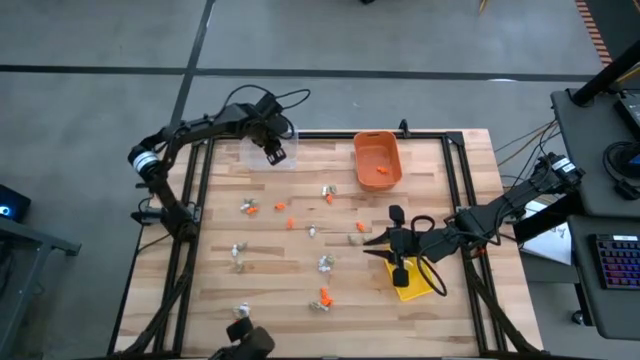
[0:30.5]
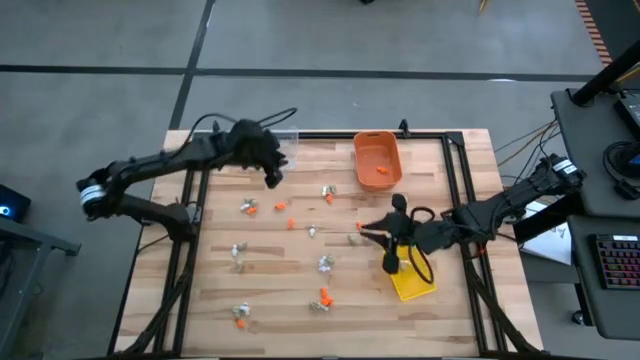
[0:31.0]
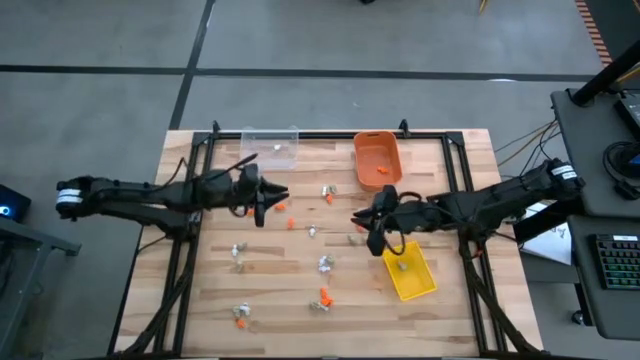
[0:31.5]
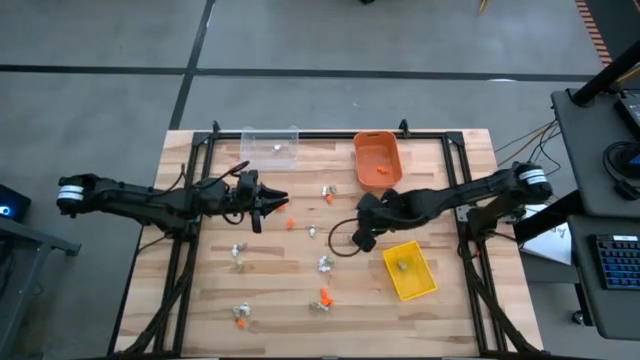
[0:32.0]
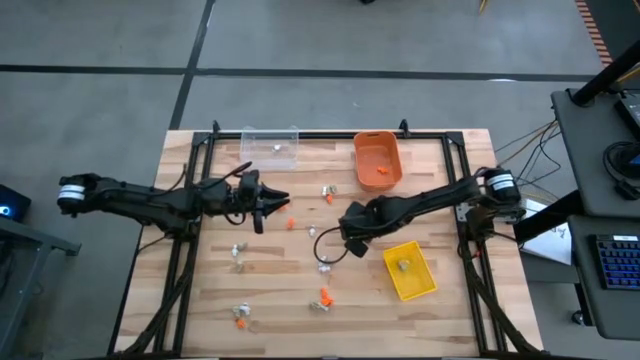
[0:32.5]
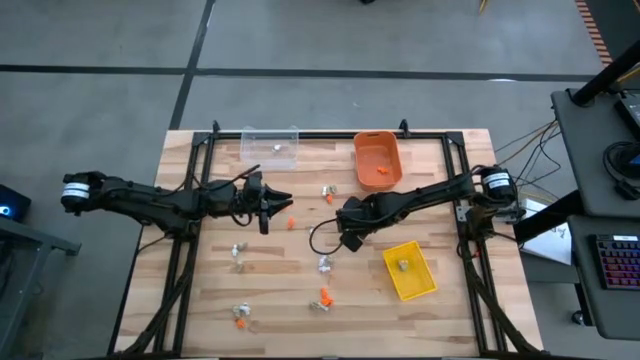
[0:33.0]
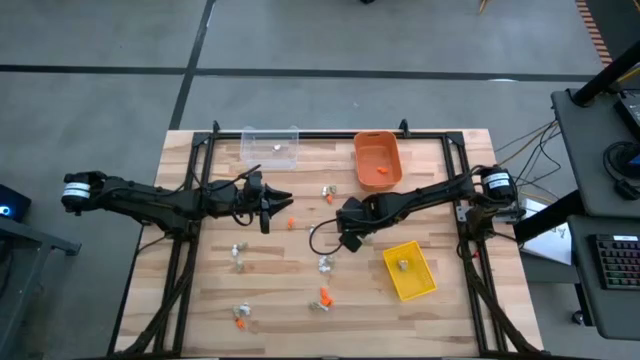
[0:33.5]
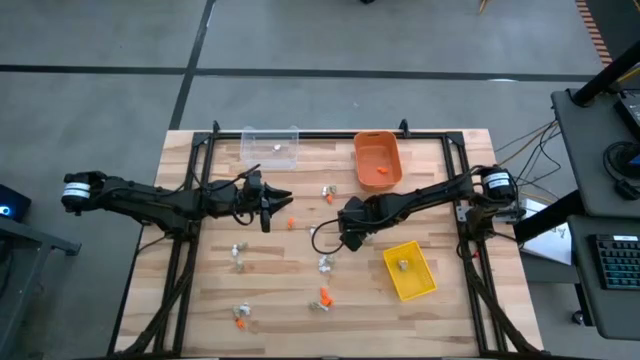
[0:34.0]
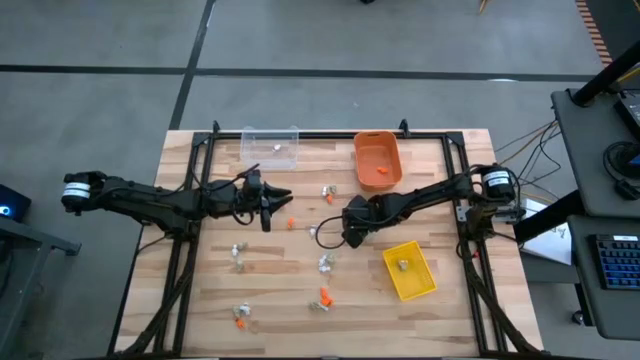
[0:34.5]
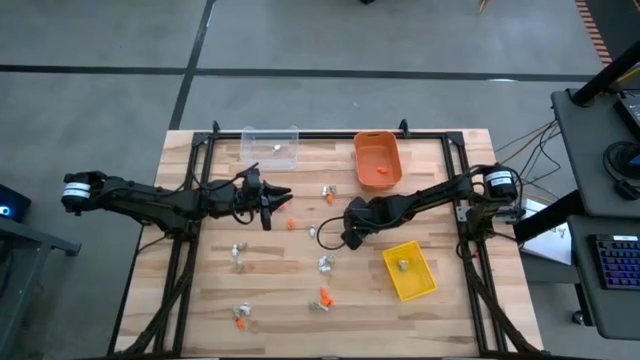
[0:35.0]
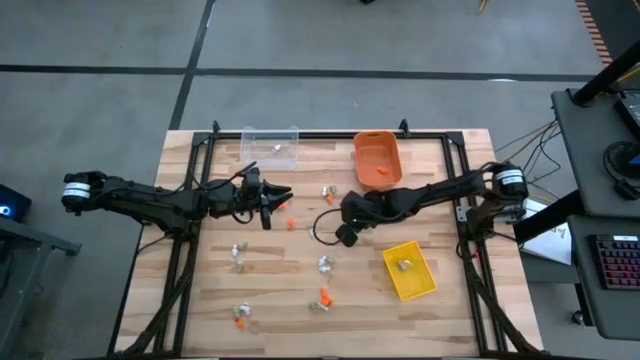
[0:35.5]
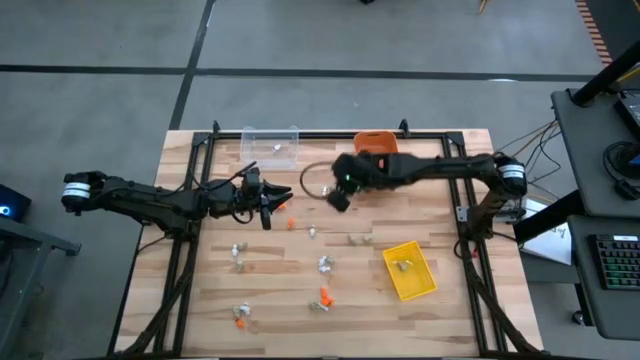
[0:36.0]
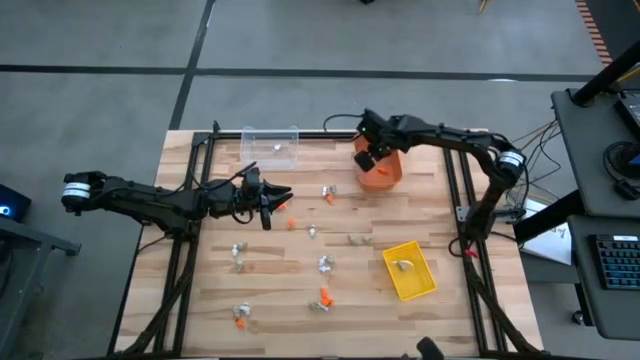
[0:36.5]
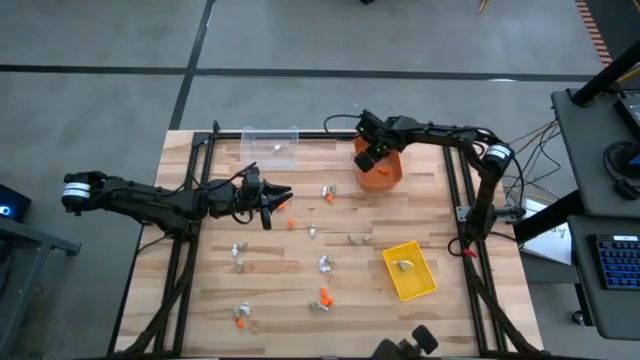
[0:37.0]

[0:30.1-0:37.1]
Task: Sort Halloween decoration
Put the orange skeleton toy into the orange bin

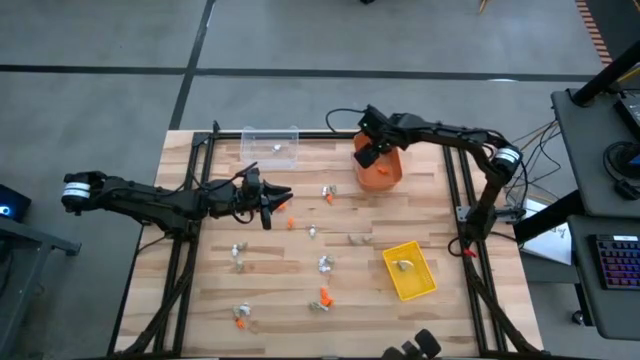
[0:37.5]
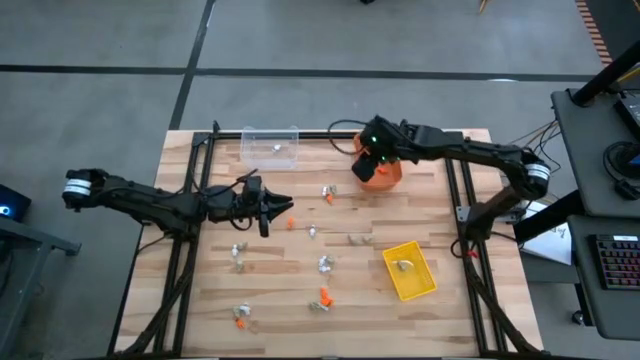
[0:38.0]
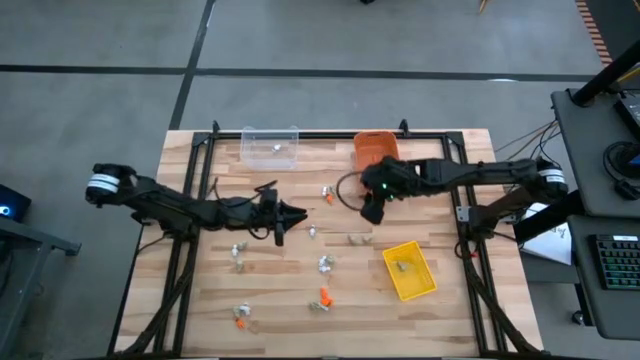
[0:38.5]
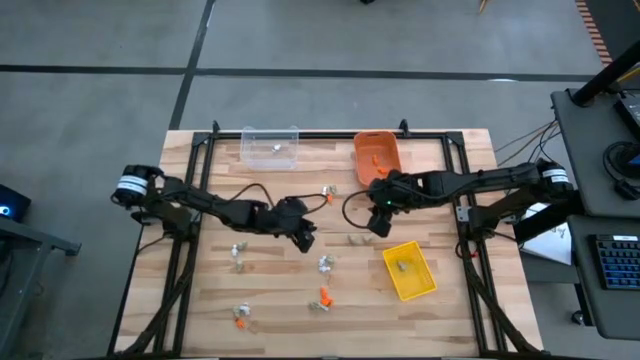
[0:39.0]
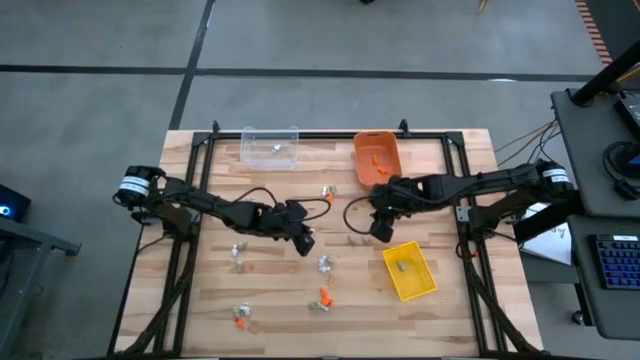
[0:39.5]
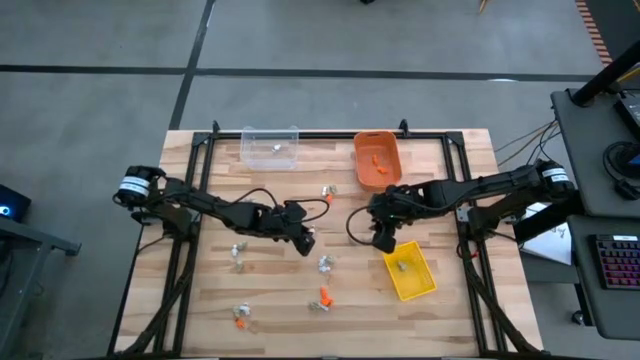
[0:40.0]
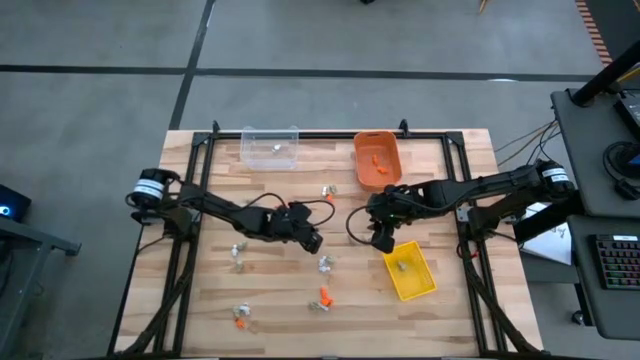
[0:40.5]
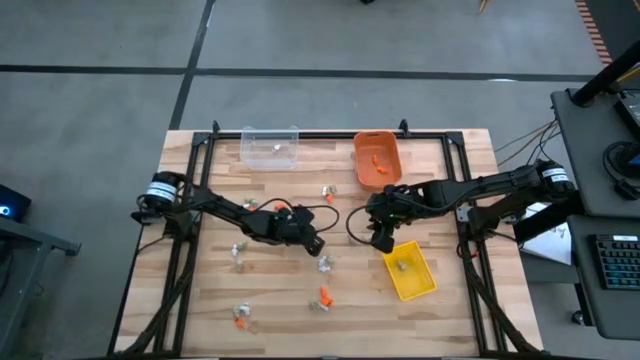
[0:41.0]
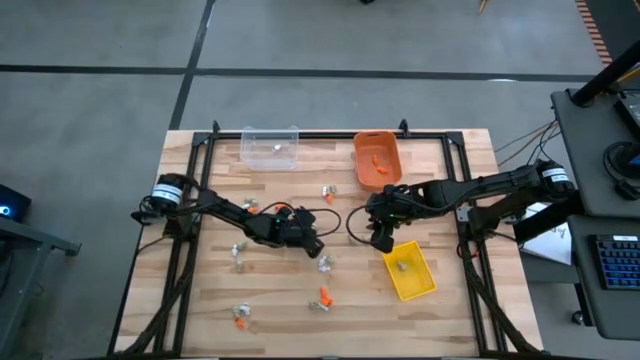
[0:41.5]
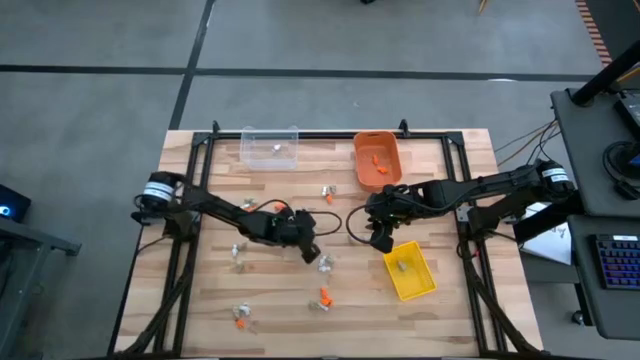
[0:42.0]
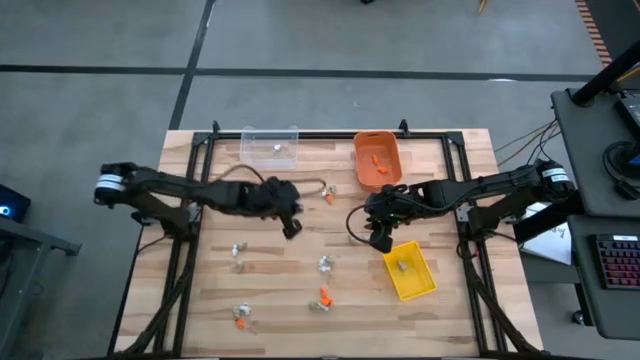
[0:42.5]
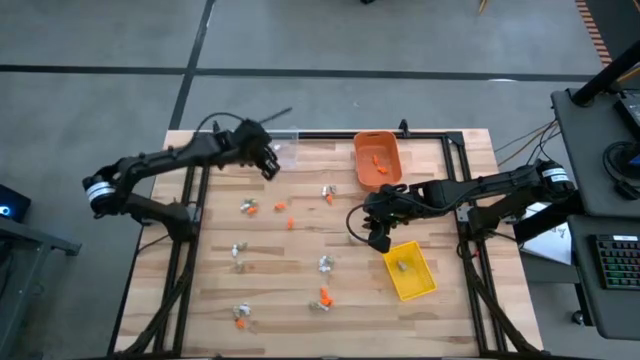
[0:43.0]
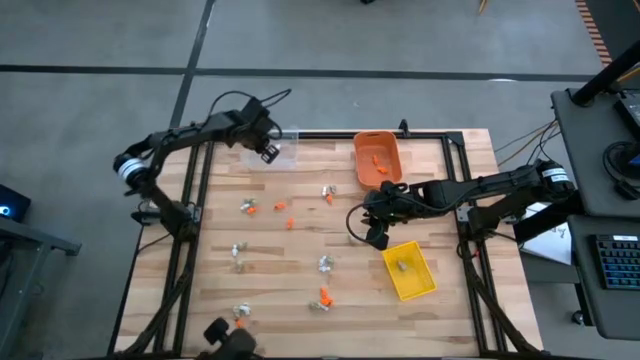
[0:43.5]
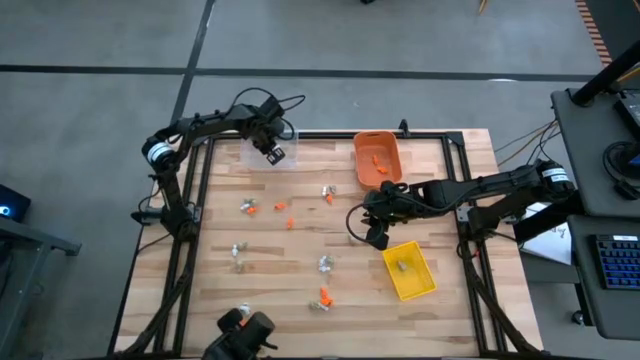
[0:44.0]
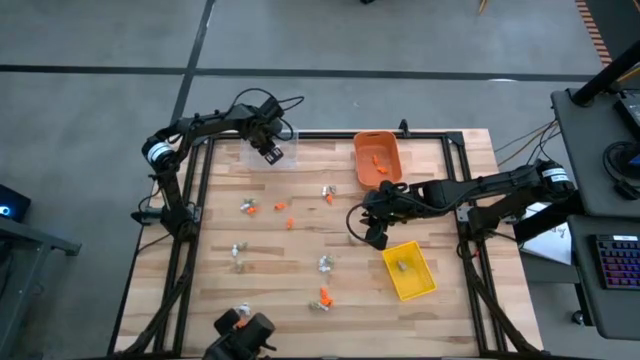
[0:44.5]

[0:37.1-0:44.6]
Put the white skeleton toy into the transparent bin

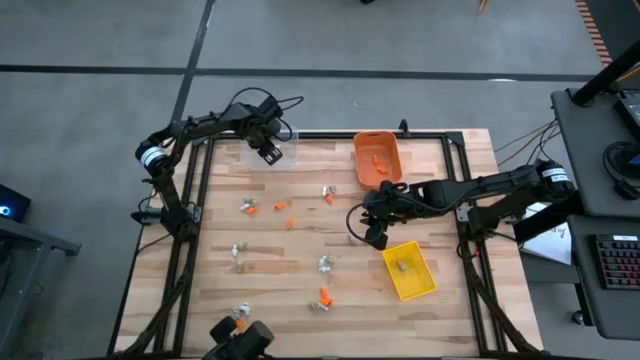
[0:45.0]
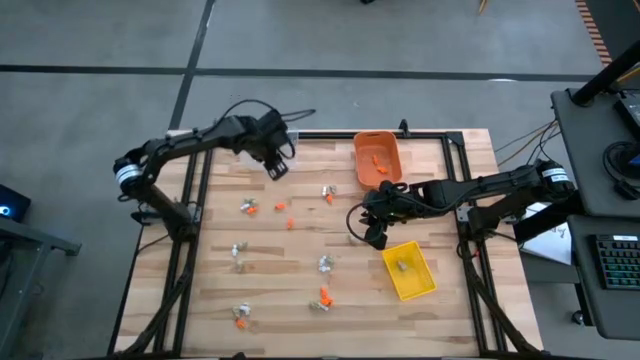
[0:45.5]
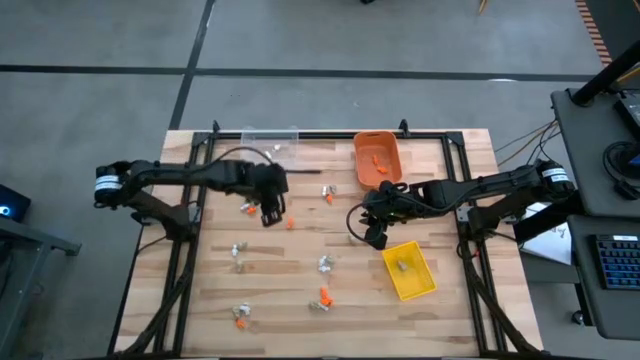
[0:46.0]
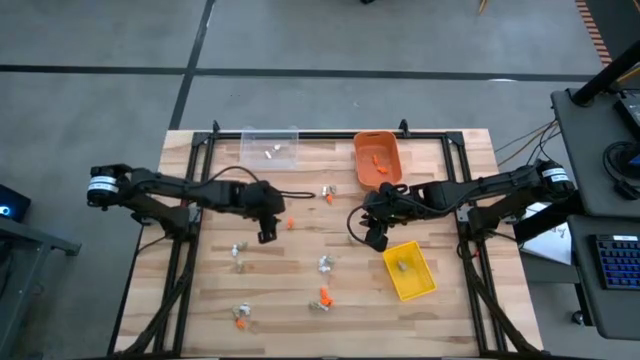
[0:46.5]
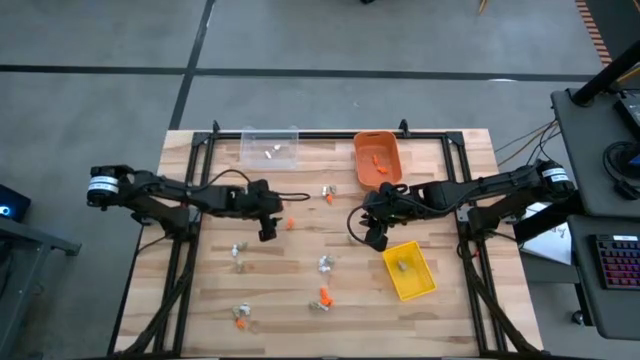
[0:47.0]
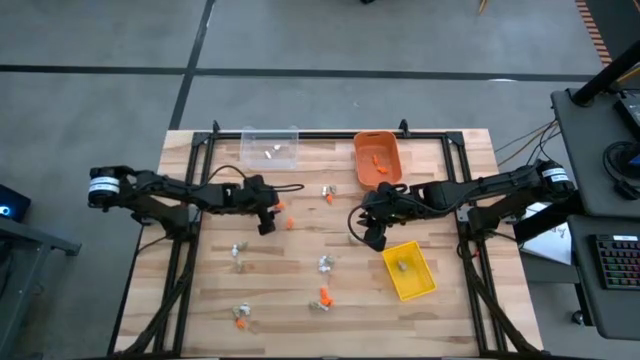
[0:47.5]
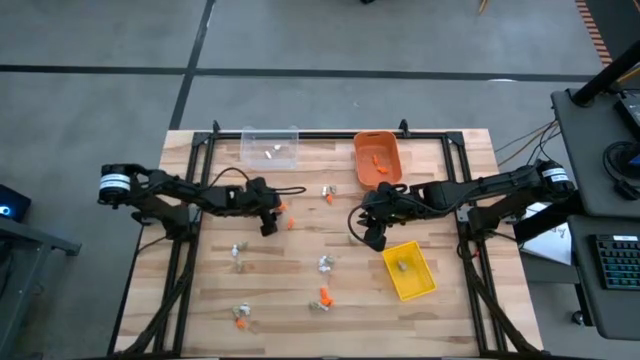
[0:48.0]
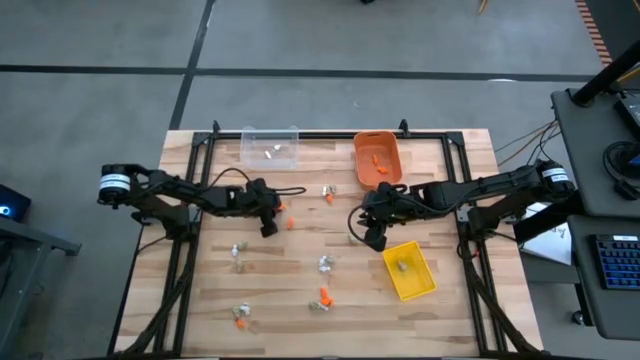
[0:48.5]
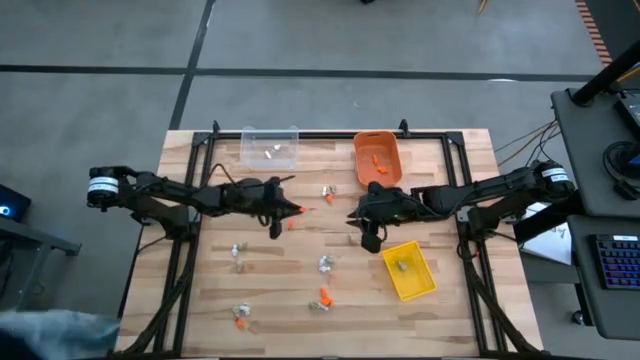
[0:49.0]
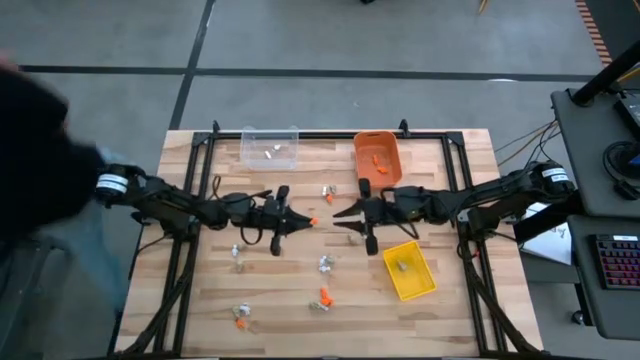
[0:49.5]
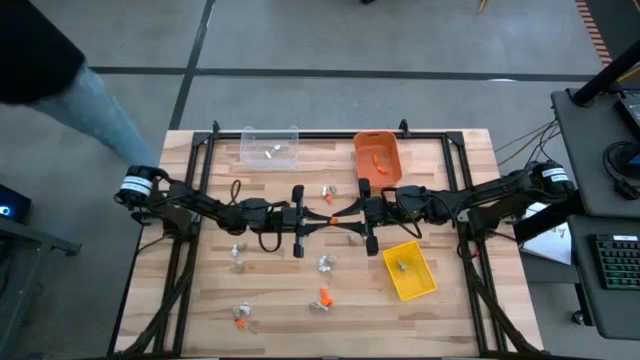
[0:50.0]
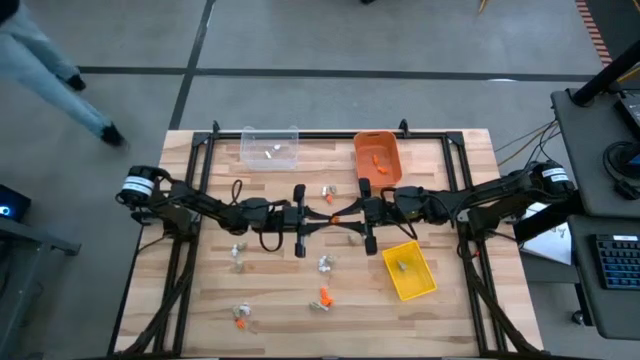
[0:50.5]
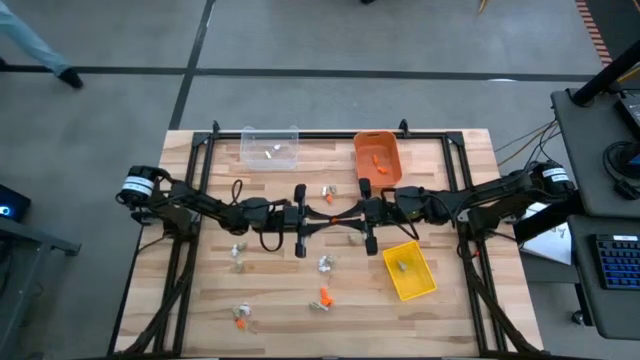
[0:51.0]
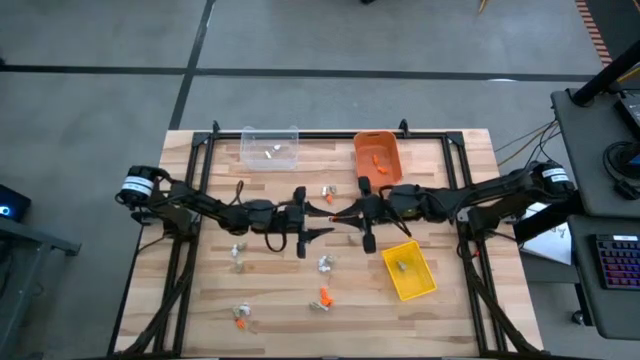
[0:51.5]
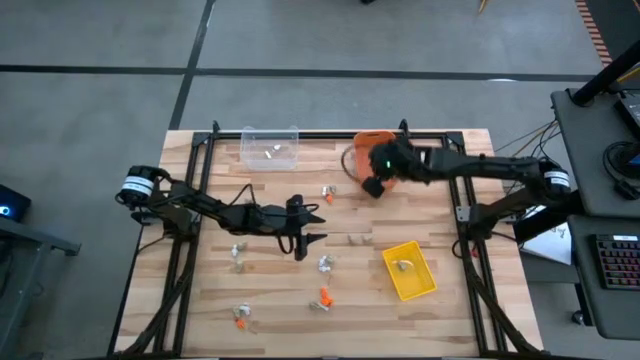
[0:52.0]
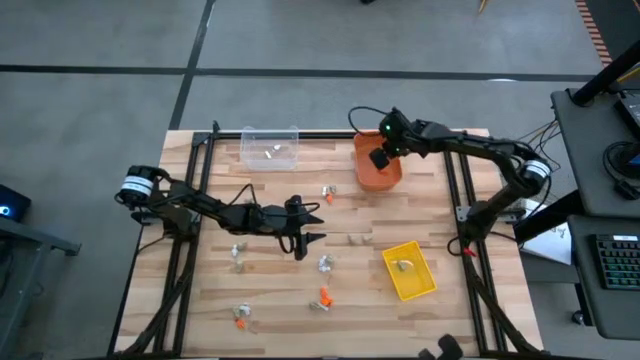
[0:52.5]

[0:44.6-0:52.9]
Put the orange skeleton toy into the orange bin
